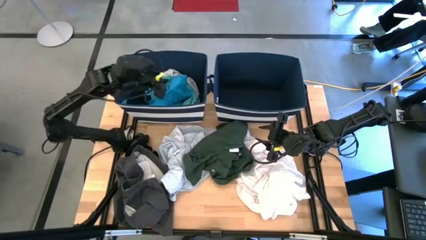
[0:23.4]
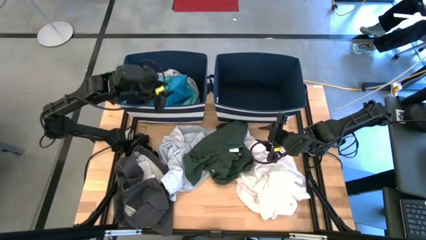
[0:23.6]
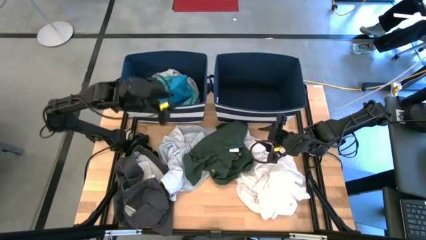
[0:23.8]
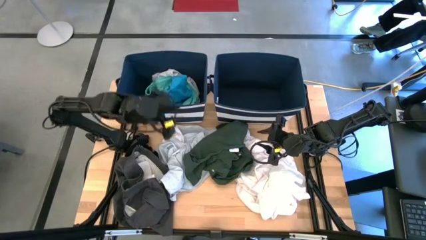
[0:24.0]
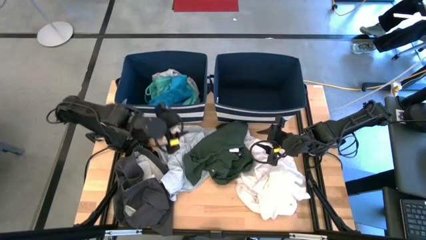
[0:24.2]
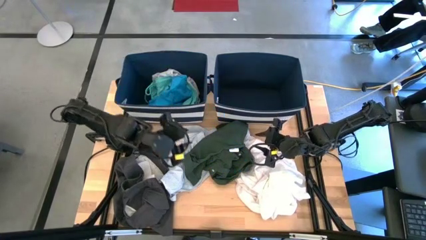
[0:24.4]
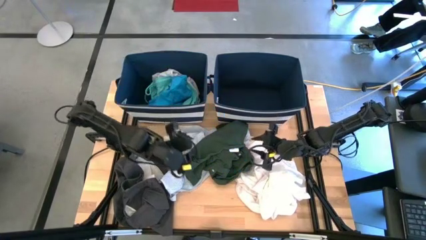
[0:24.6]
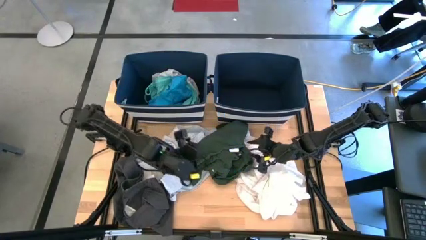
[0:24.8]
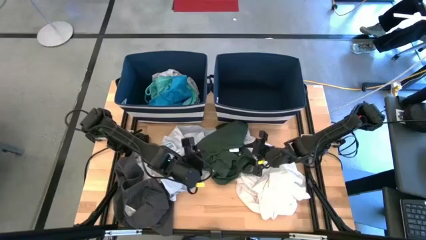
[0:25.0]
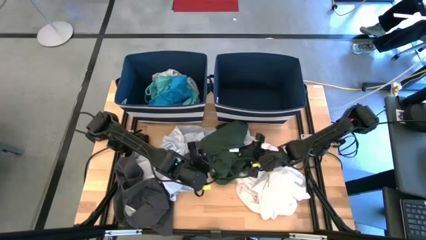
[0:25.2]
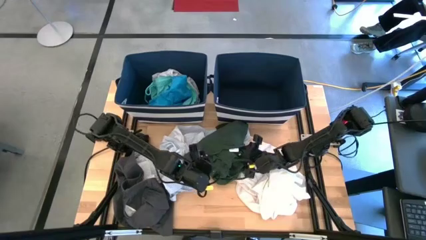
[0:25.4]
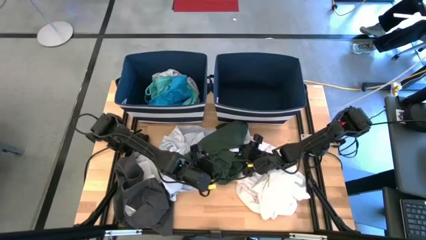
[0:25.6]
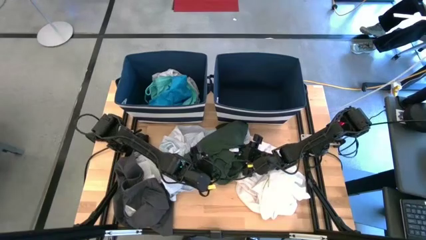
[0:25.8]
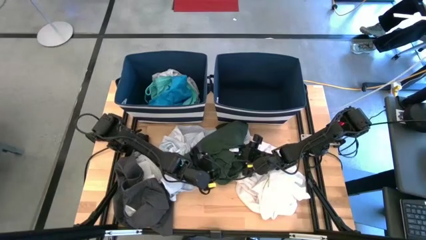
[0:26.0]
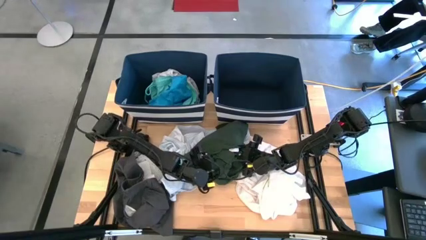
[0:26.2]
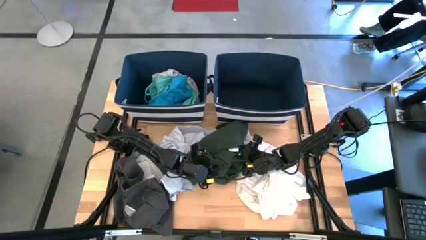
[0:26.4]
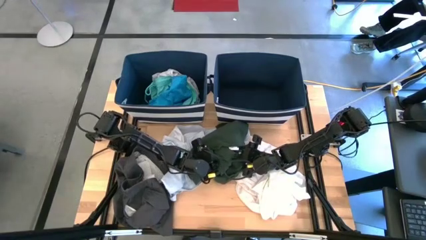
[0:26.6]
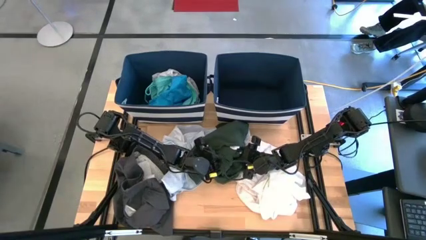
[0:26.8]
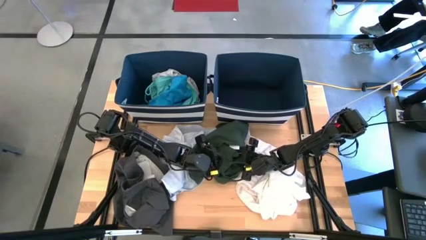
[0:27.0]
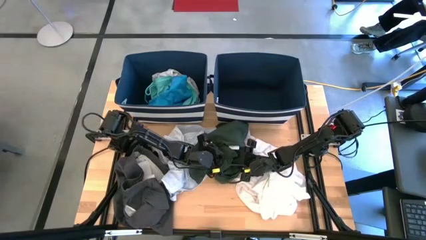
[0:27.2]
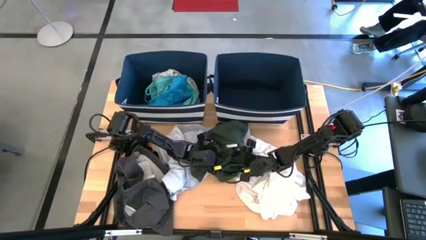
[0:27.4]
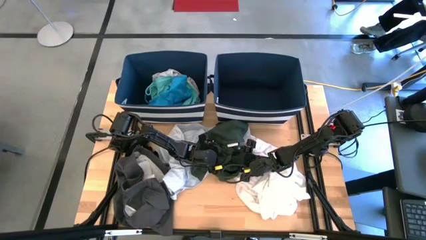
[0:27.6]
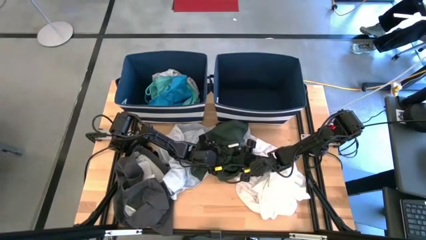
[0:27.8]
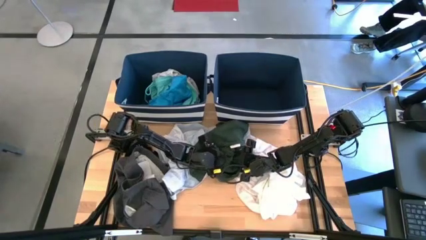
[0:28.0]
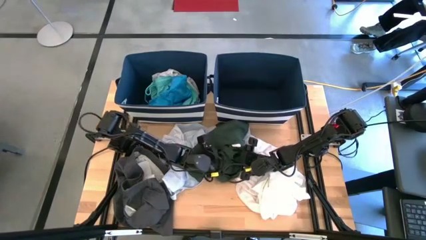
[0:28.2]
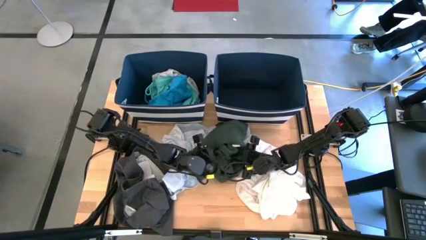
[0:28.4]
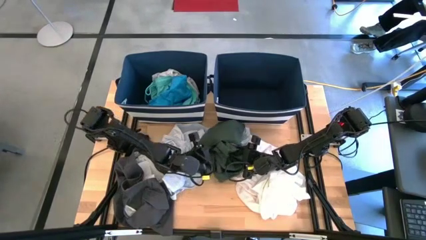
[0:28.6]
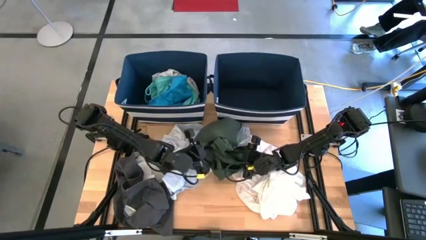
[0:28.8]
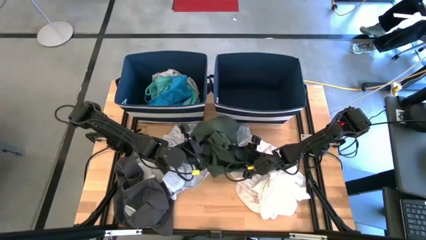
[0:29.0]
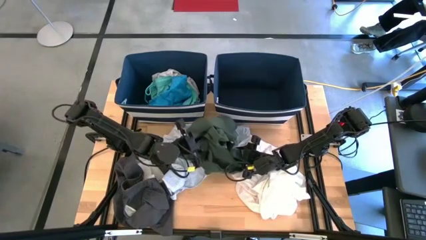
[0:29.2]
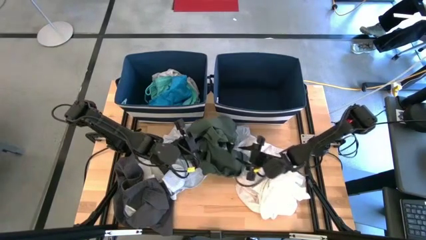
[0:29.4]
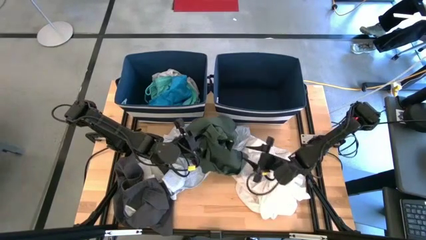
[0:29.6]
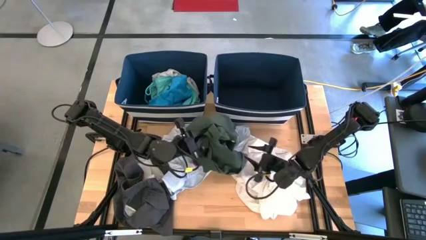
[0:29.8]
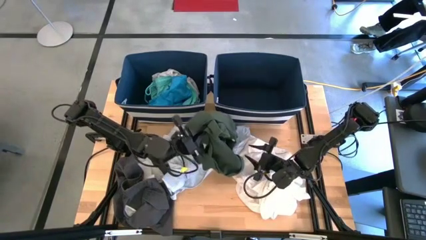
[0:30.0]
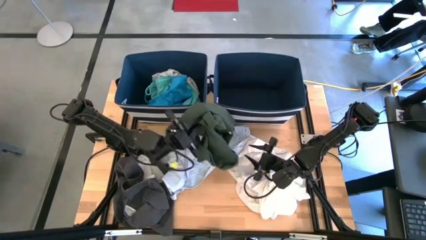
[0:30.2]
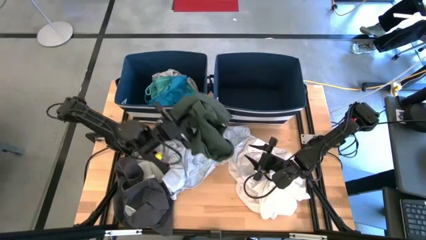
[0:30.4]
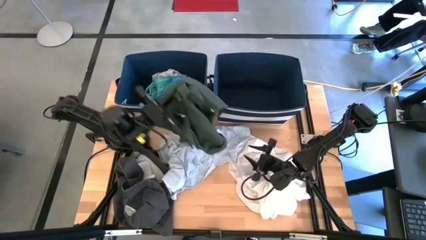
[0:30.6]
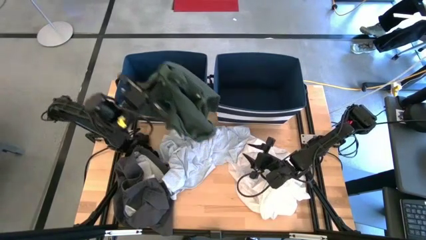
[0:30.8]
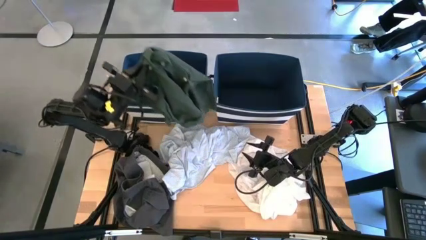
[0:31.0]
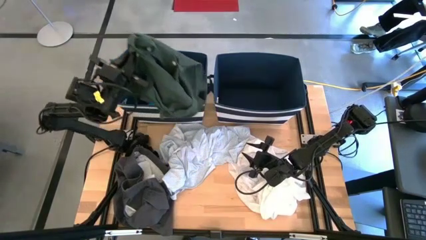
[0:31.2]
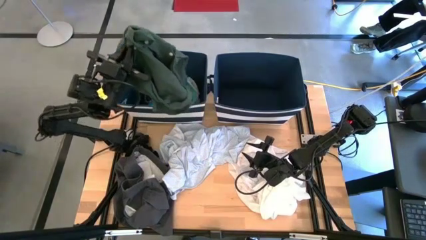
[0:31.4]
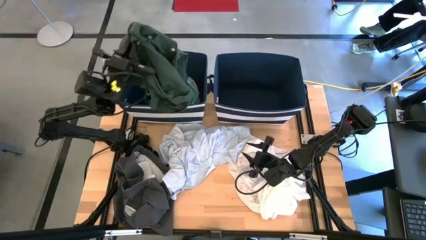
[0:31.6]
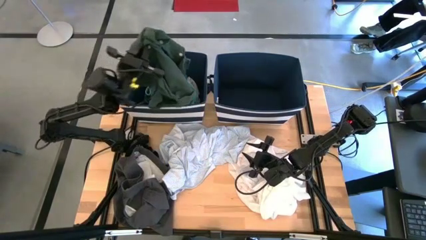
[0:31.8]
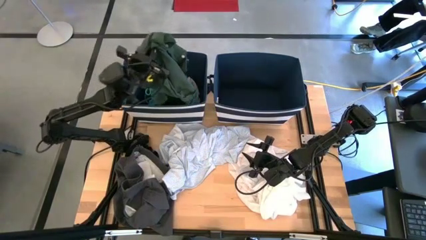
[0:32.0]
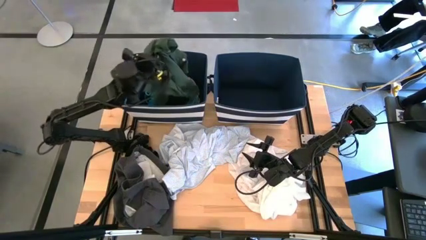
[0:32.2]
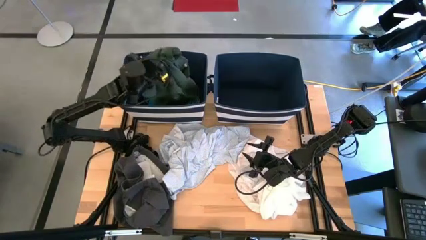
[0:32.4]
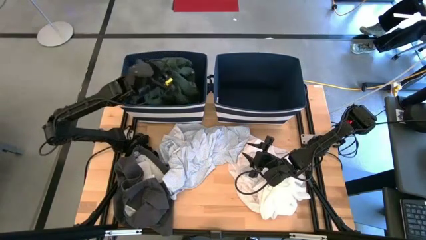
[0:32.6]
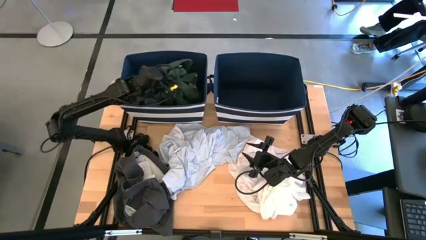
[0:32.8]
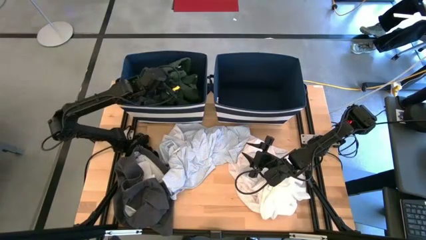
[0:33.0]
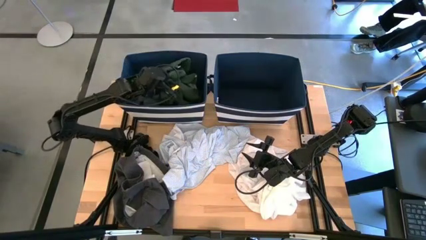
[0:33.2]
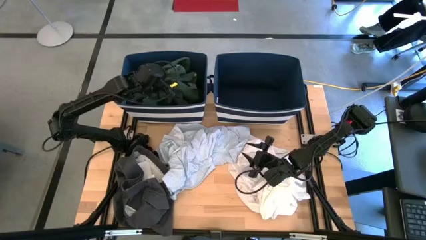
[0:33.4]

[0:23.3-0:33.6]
Task: Sort clothes
Put the green long sleeve polo shirt into the left laundry bin
